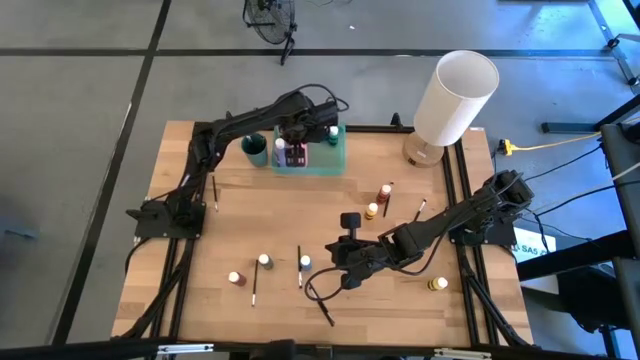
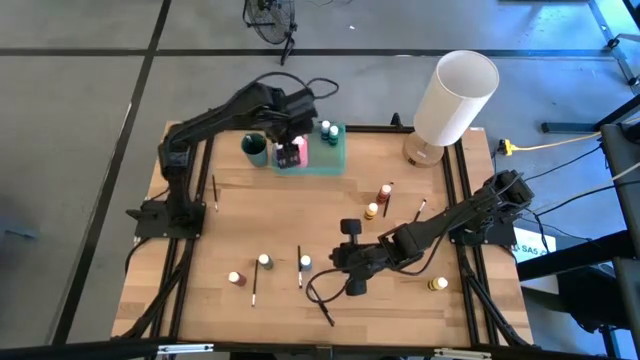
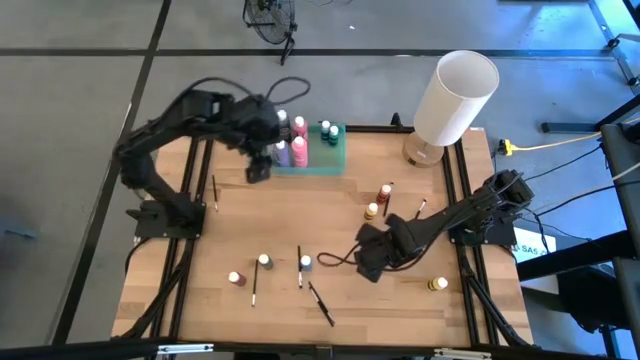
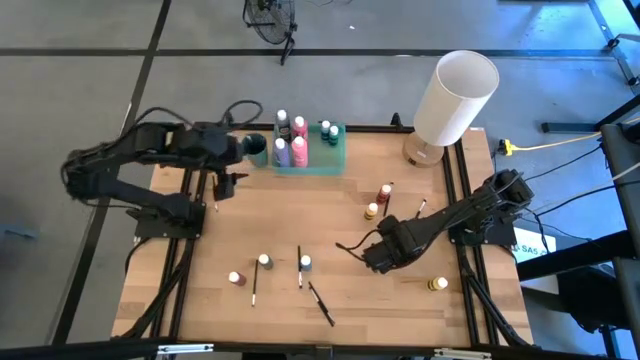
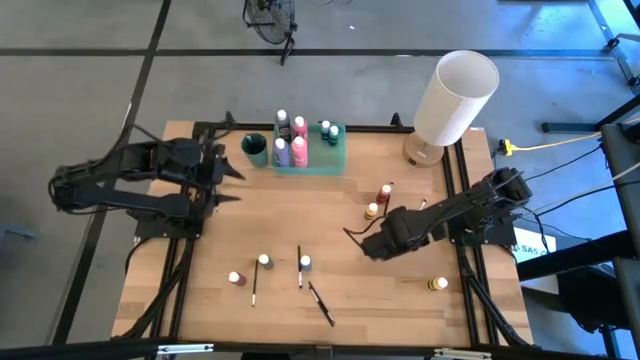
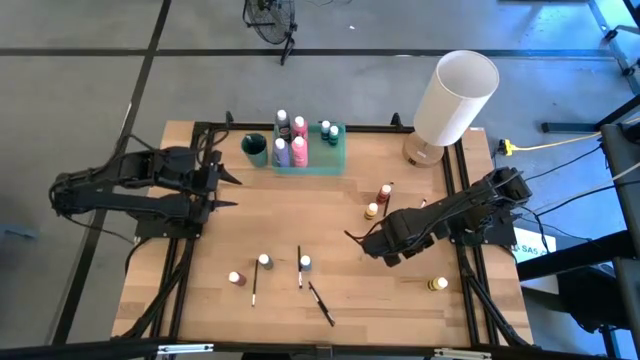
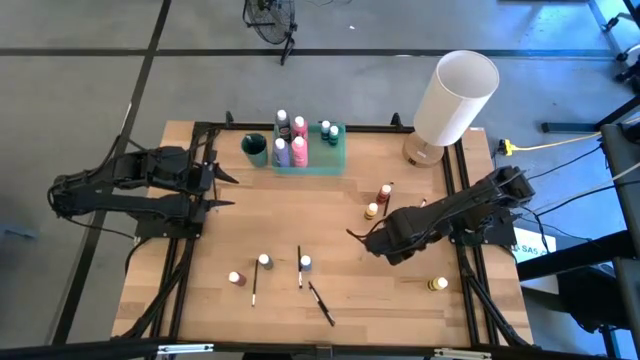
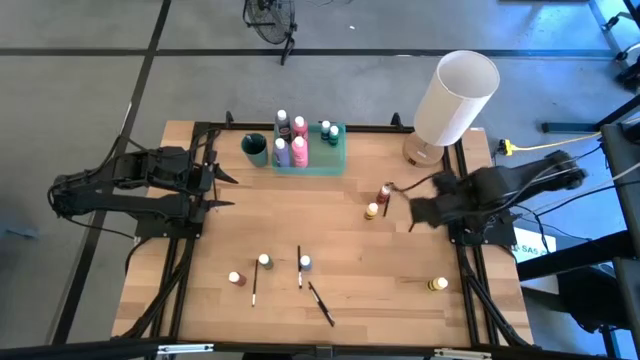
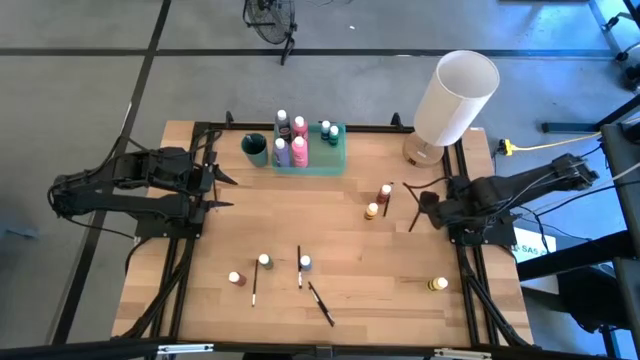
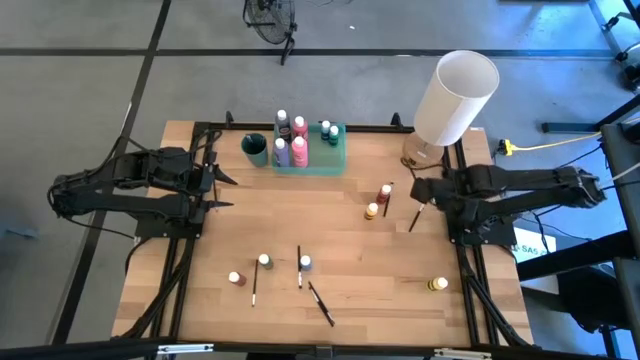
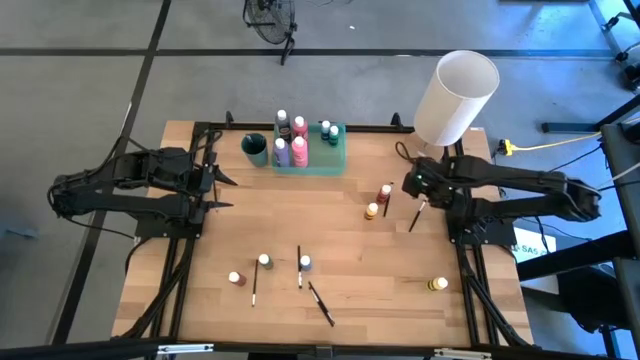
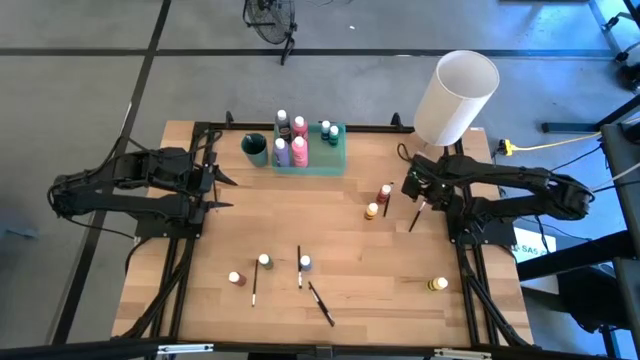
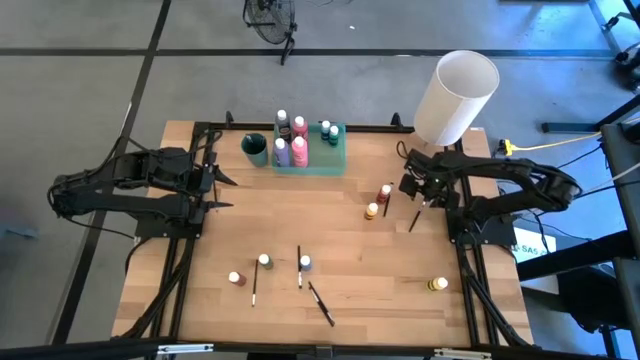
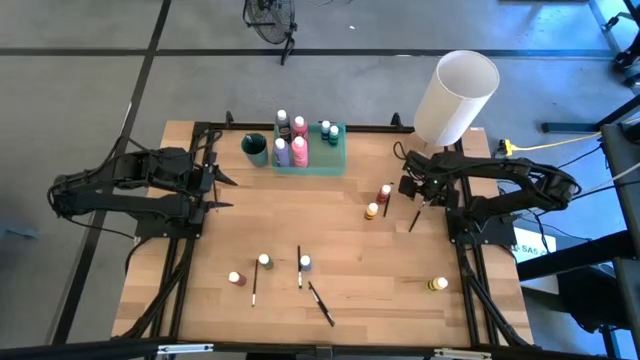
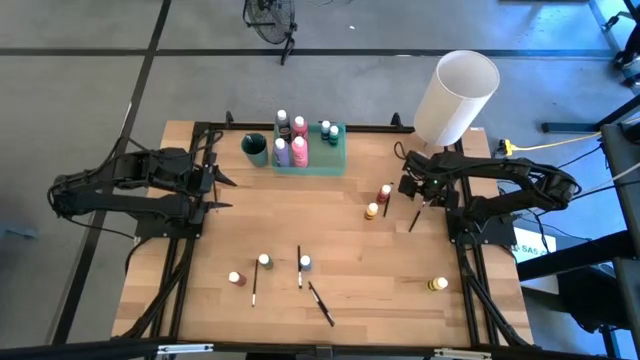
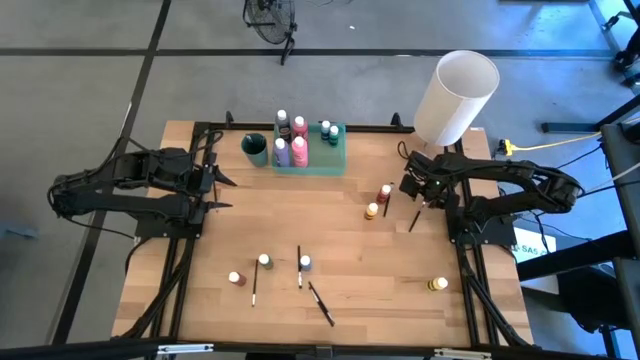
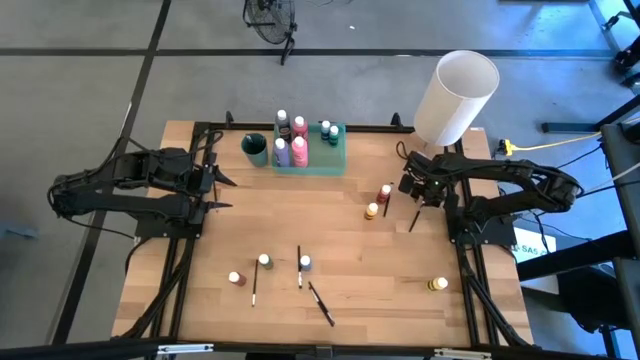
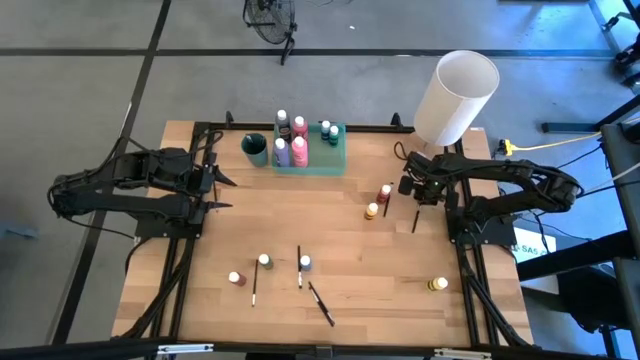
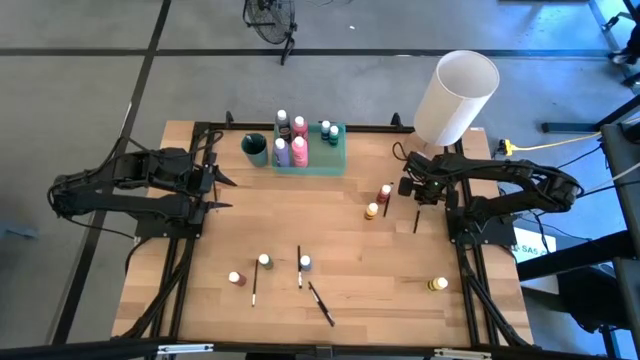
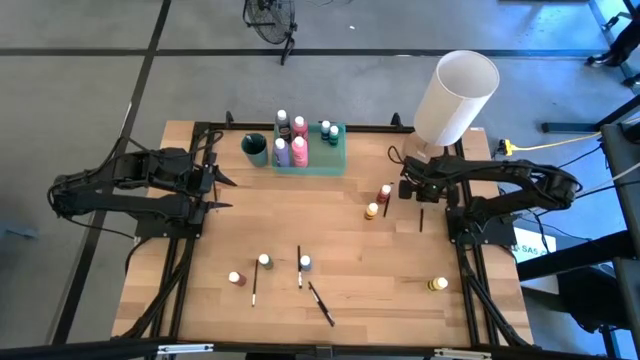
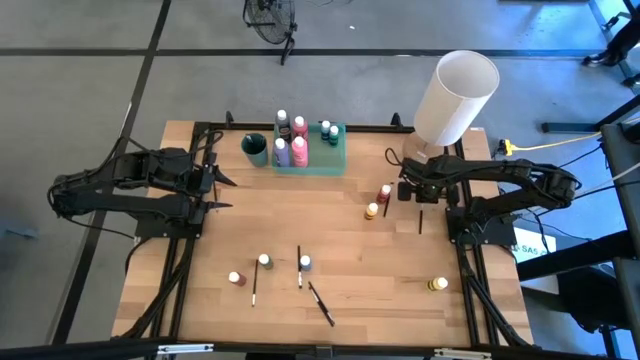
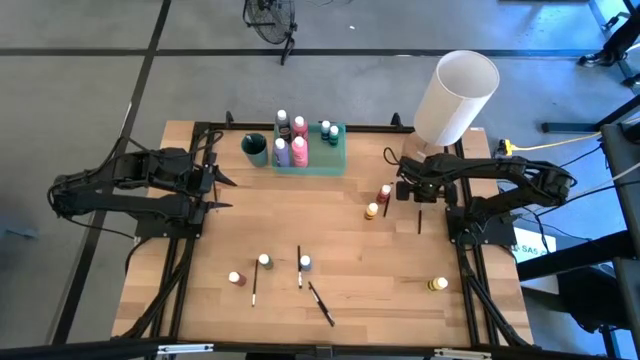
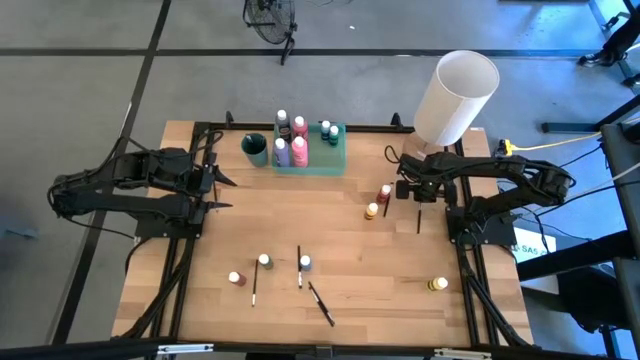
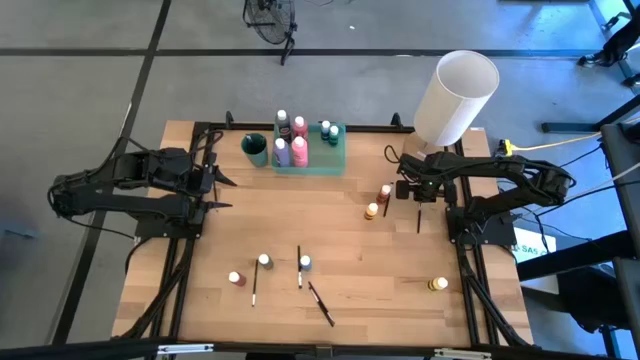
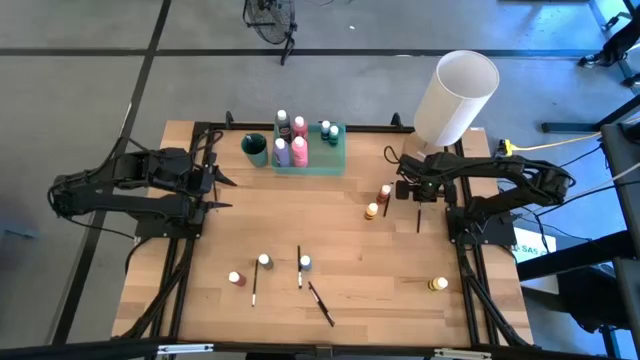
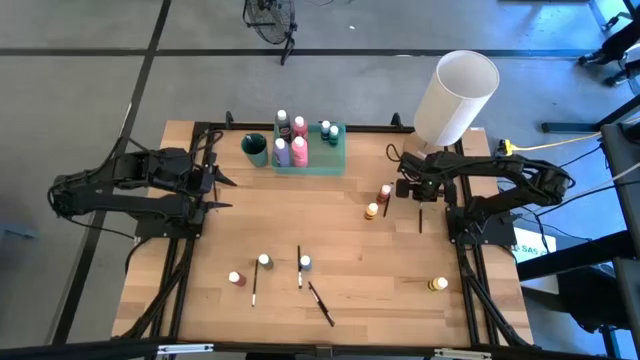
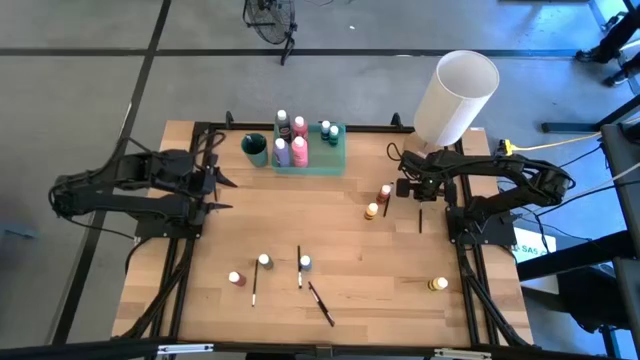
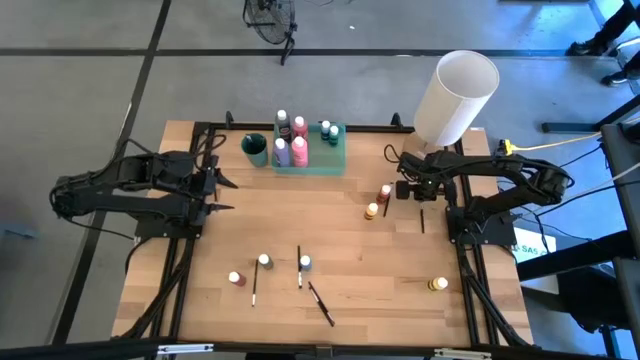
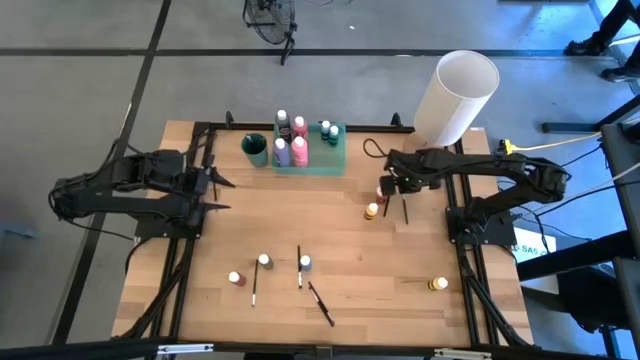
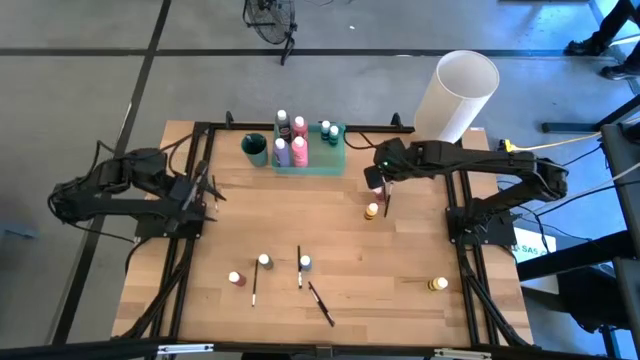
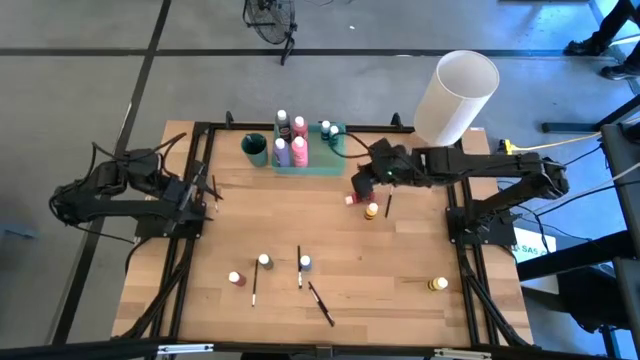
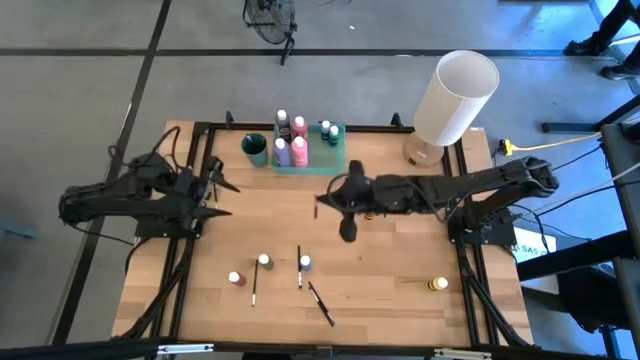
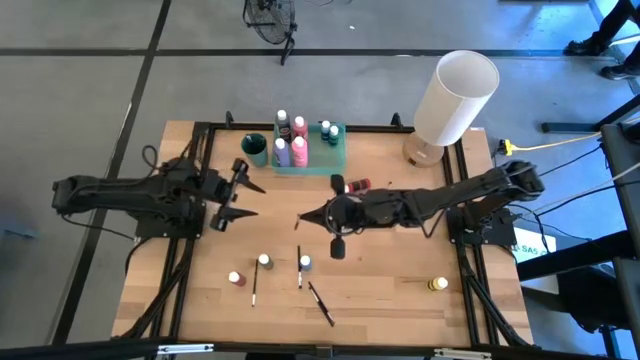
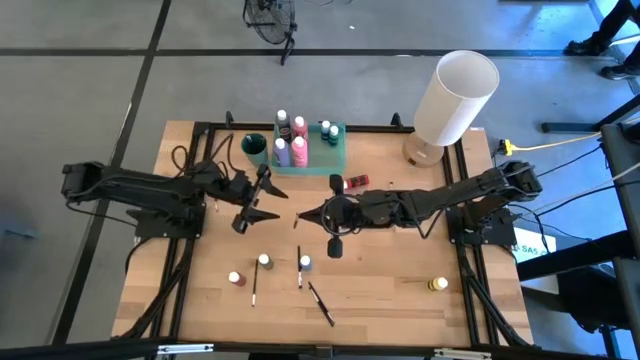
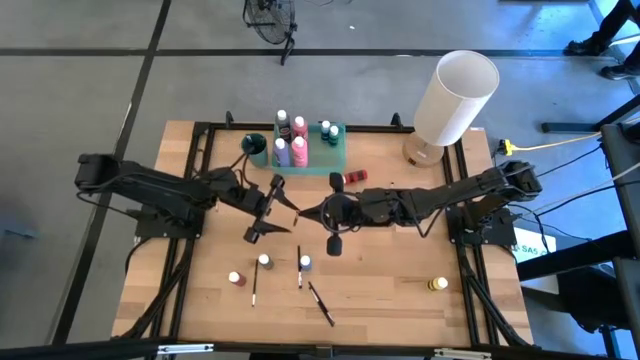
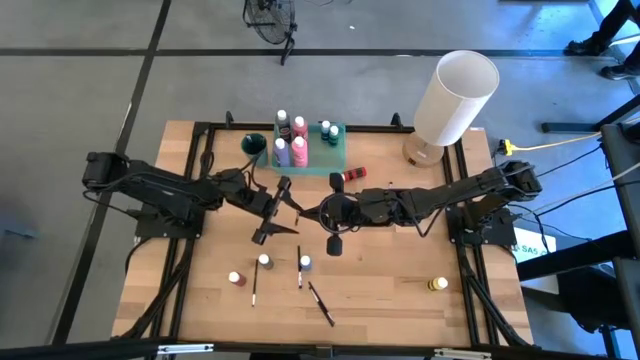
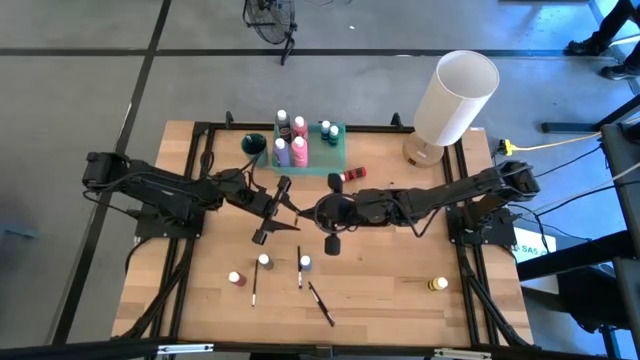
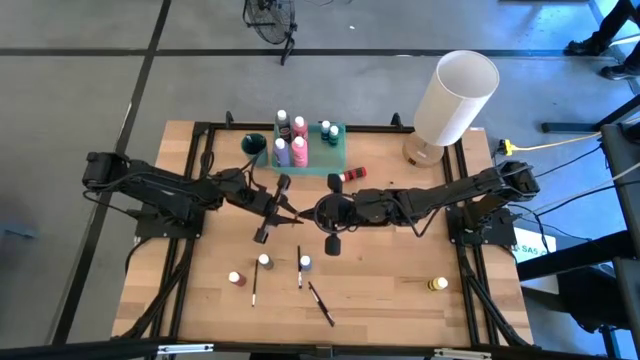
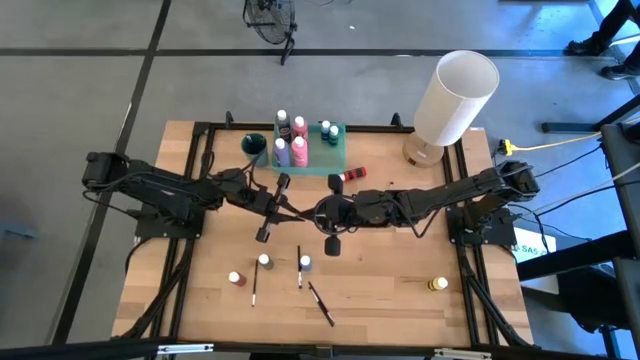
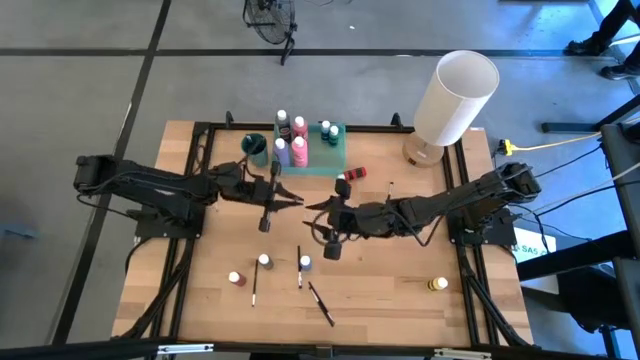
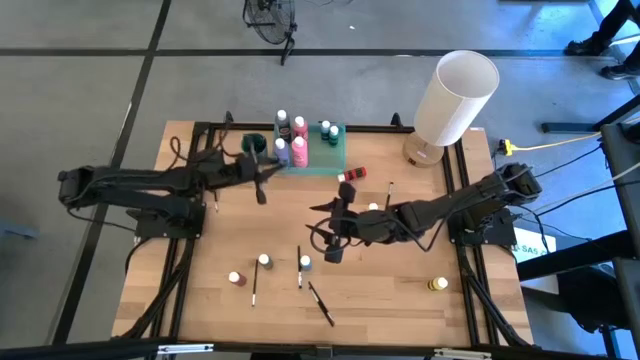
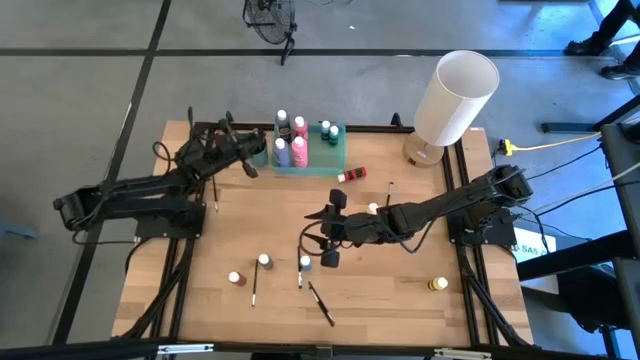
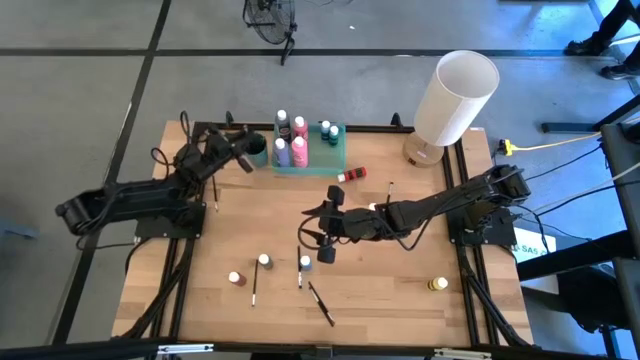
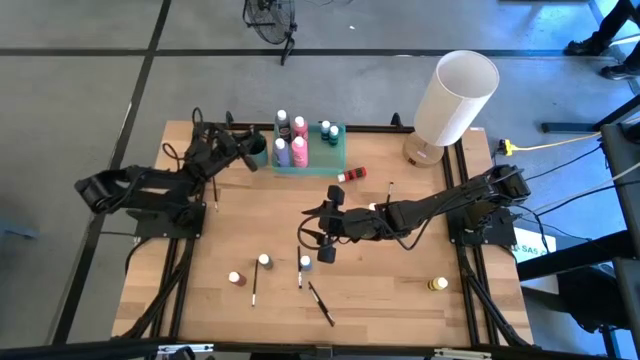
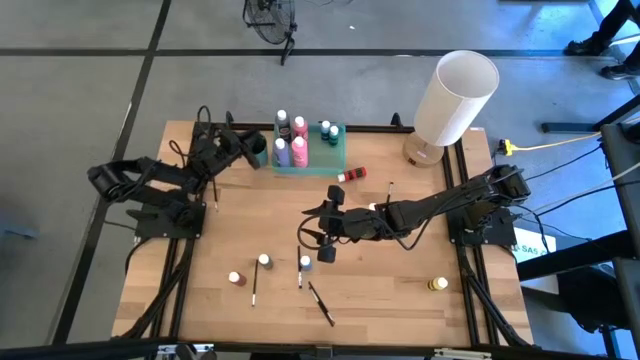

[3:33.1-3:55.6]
Task: Pick & Place Paint Supplies
Put the silver paintbrush into the green cup
